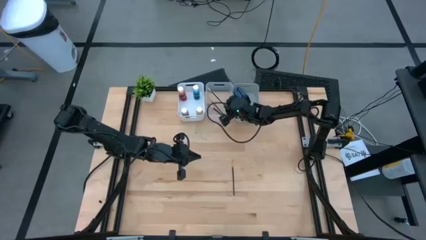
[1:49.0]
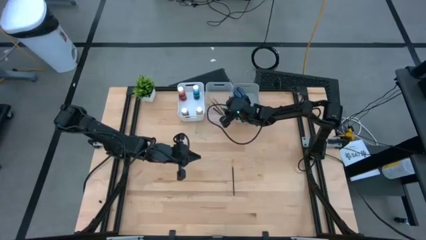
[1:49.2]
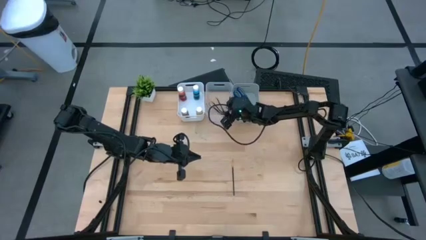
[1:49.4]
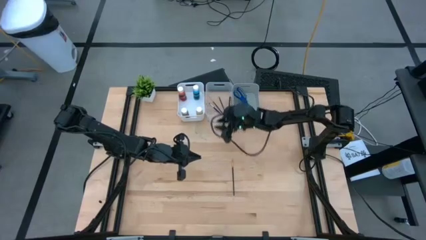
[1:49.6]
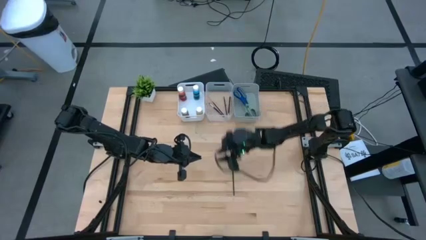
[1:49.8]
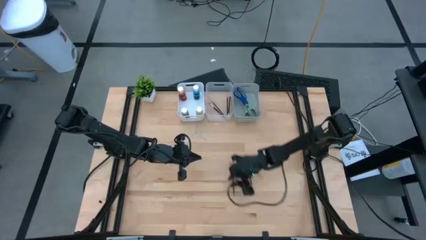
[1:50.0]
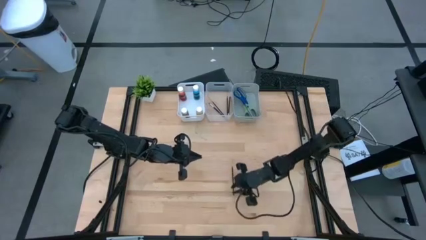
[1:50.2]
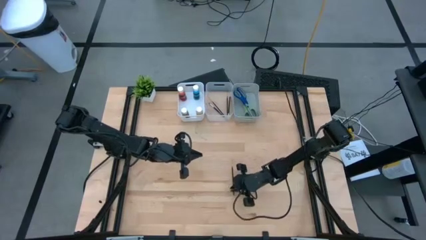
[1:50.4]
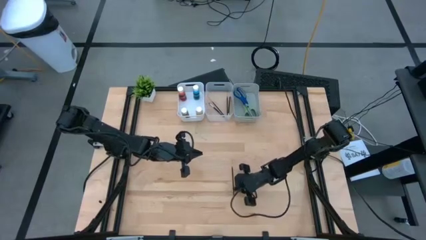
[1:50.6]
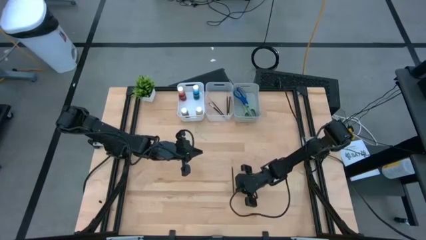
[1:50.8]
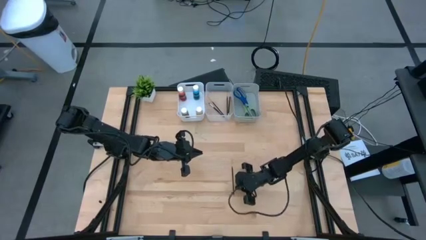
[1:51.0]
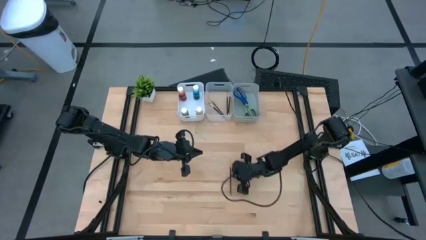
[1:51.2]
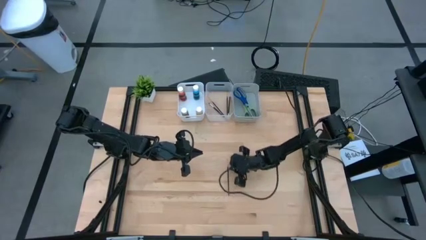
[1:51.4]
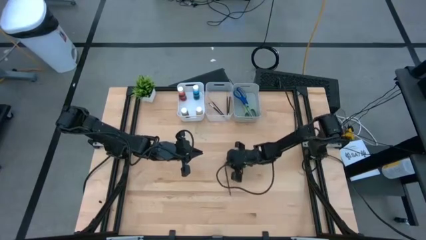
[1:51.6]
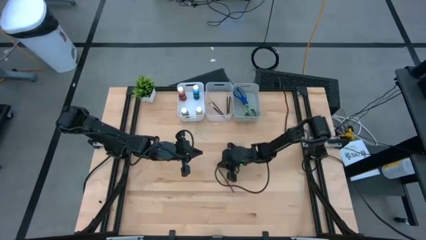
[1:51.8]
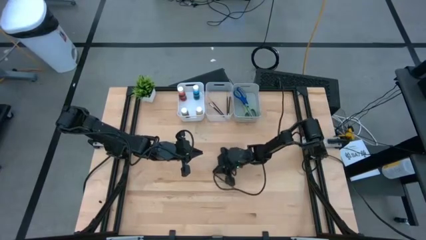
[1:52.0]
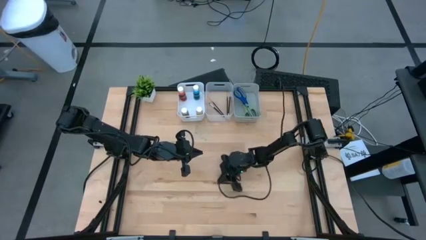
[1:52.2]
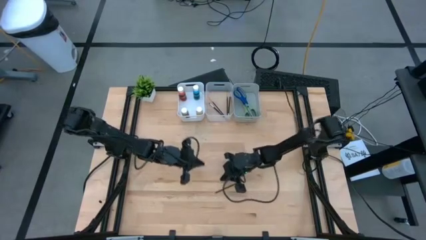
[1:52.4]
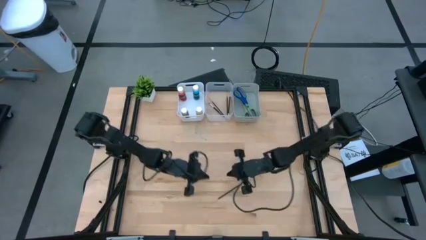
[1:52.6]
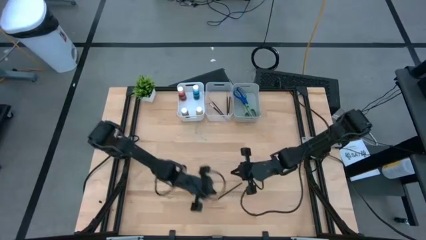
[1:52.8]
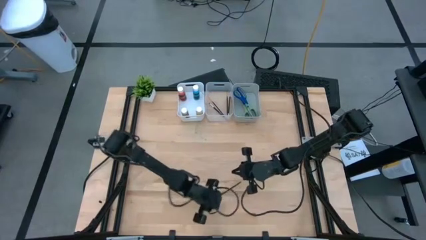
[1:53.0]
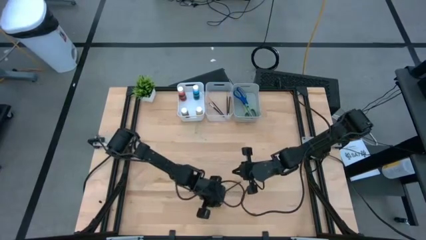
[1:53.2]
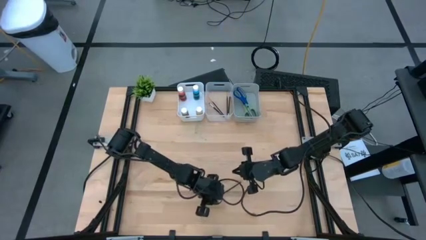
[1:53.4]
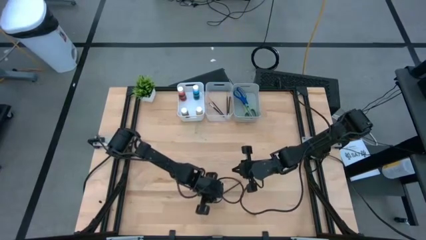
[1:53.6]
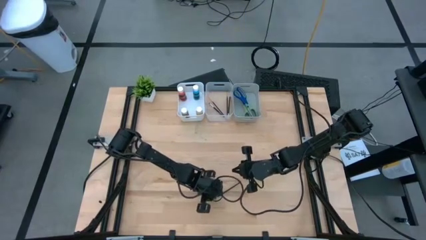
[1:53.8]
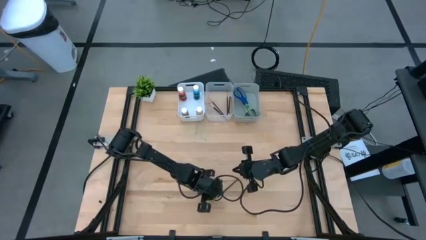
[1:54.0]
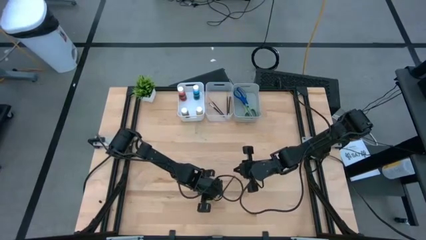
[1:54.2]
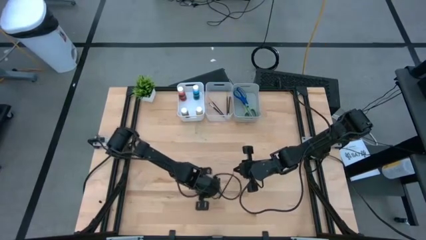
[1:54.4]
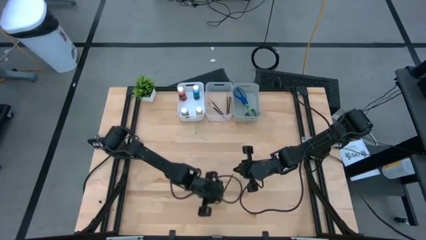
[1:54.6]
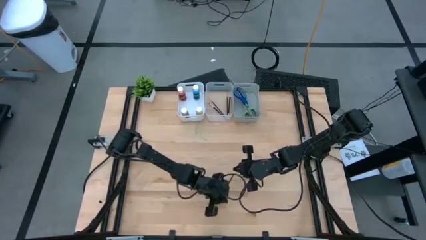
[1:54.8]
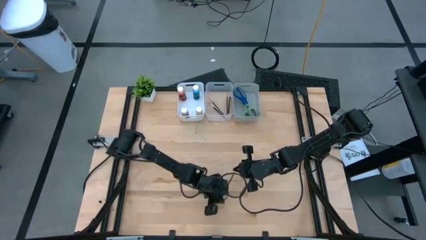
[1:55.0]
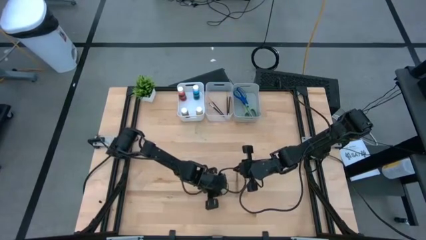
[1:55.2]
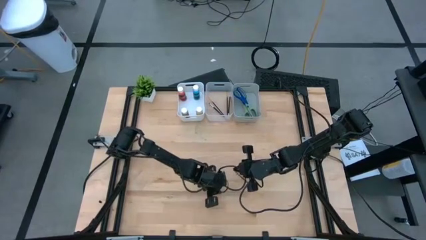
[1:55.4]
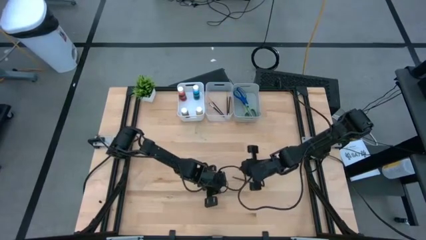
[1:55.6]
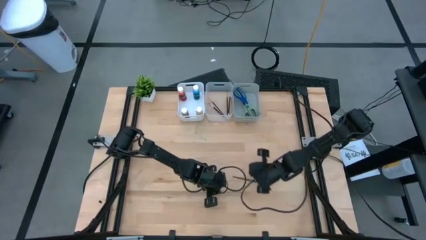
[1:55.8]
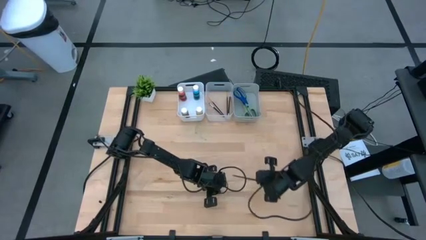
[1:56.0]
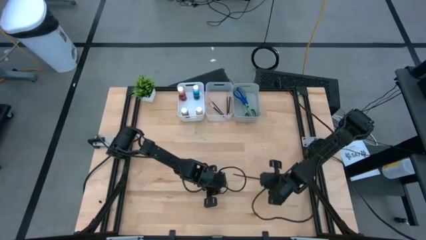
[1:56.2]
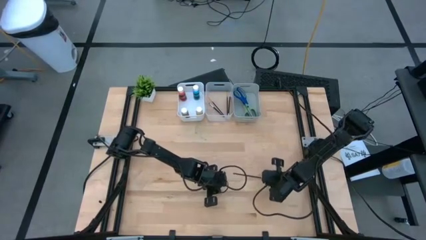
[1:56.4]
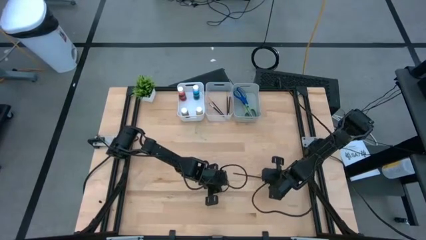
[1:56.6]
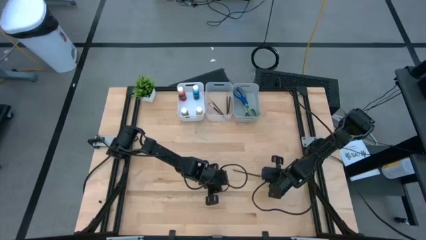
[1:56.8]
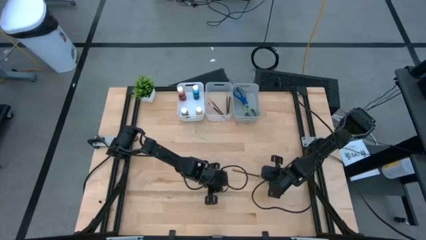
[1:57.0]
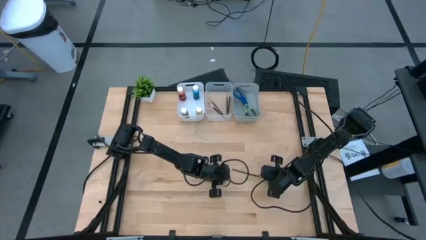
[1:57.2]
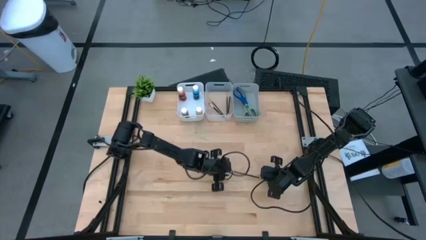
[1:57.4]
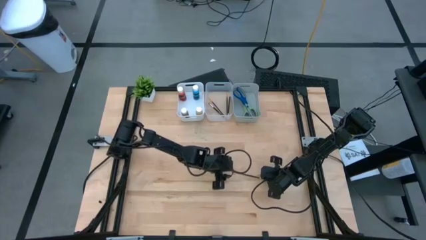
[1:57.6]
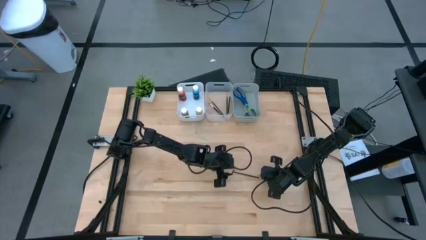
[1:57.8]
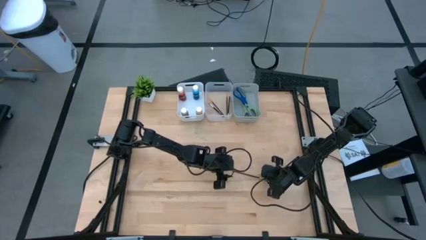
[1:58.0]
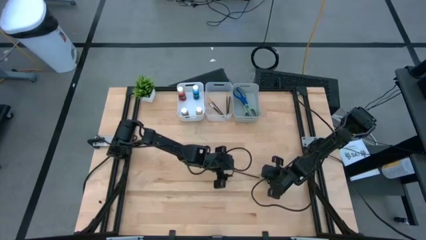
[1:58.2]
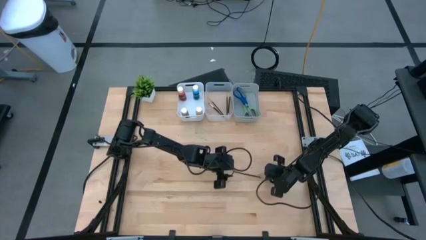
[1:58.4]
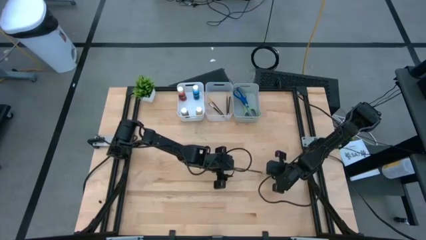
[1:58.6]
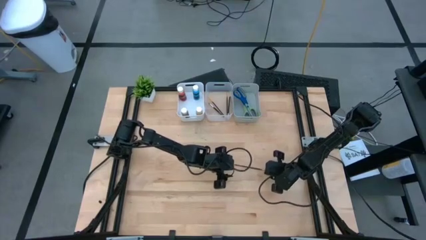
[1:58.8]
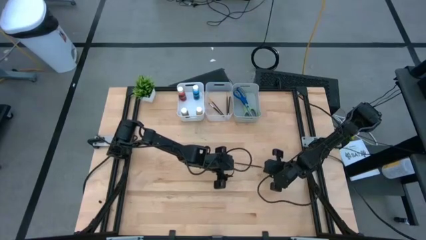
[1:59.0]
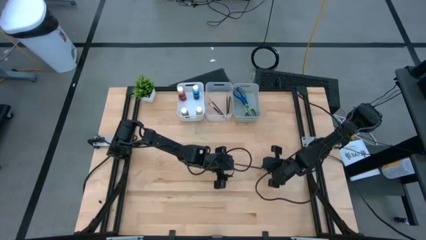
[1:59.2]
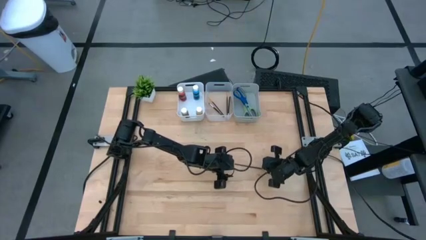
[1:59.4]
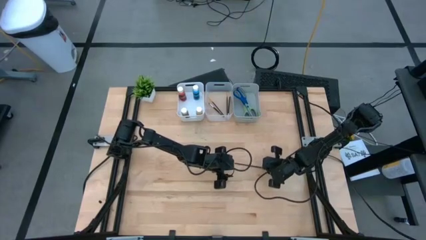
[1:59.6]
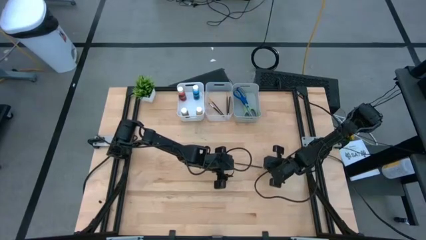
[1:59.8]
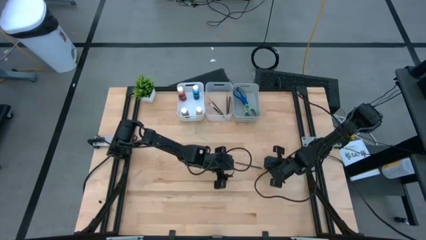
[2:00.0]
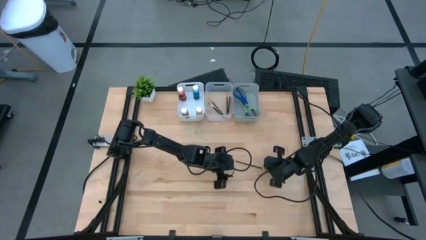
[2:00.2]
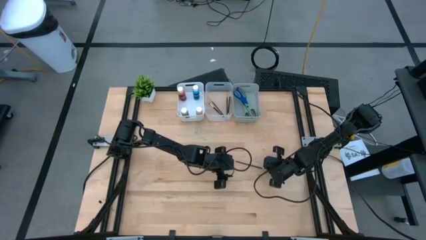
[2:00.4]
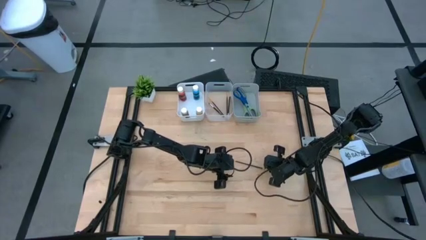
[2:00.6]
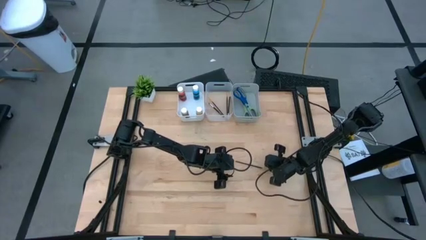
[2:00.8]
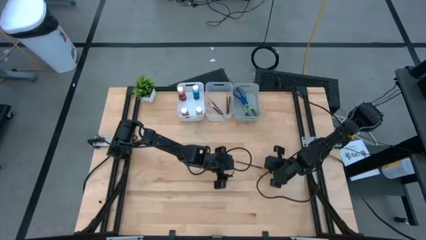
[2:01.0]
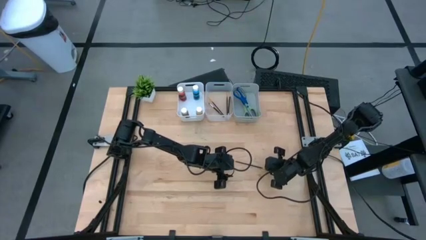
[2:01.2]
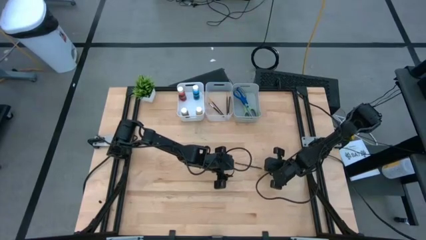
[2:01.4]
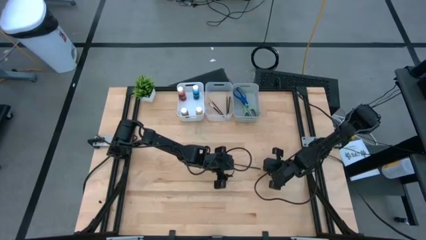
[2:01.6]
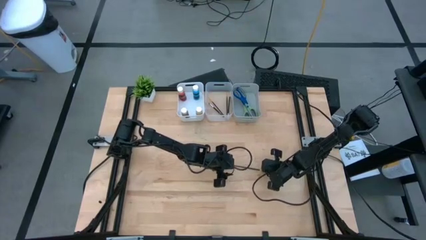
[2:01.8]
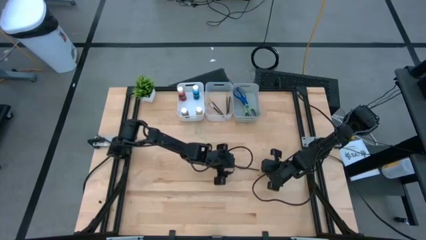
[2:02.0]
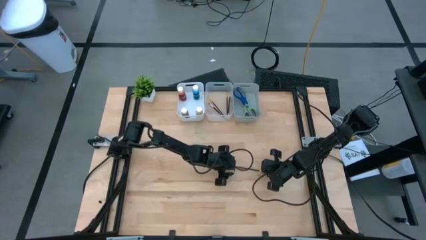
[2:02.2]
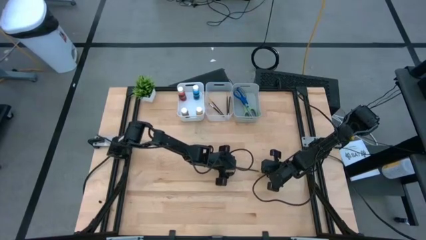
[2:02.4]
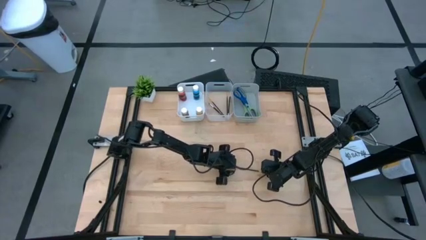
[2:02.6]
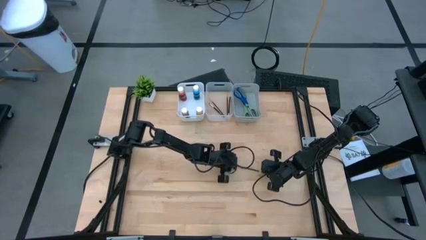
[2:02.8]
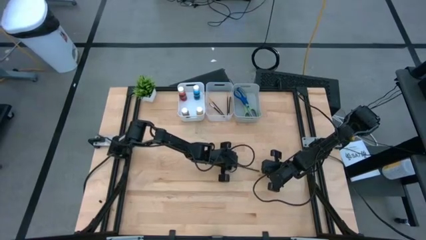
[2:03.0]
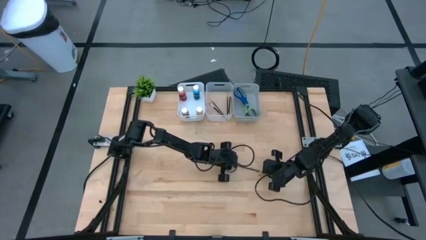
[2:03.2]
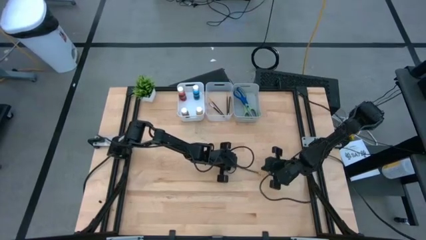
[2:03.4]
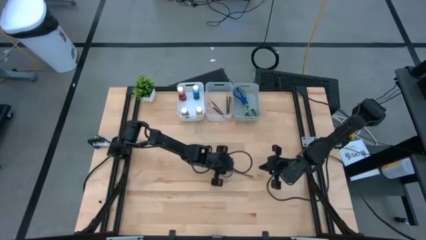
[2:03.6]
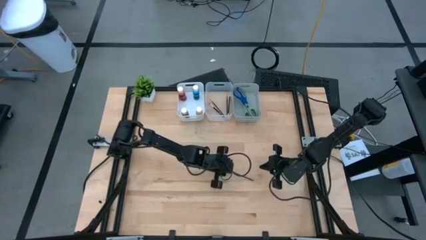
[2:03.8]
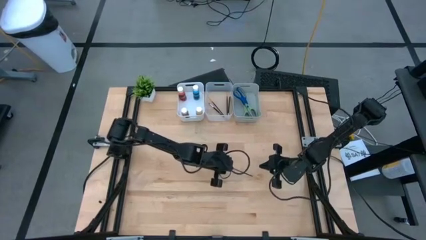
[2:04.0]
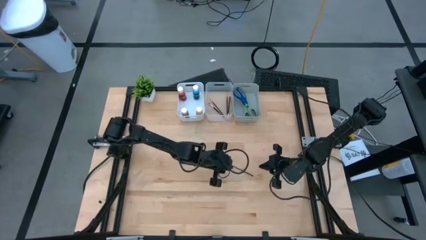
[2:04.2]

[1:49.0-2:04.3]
Task: Pick & Place Paint Supplies
Put the golden paint brush into the transparent bin

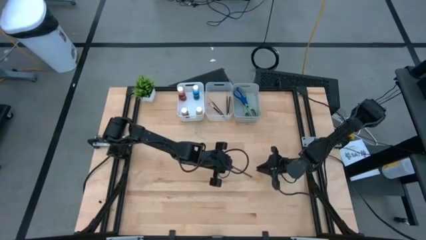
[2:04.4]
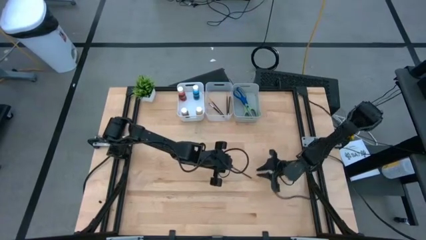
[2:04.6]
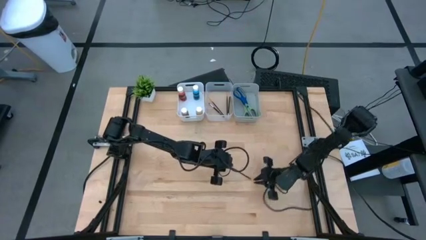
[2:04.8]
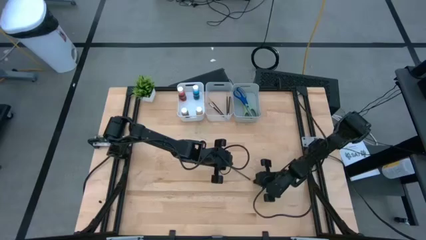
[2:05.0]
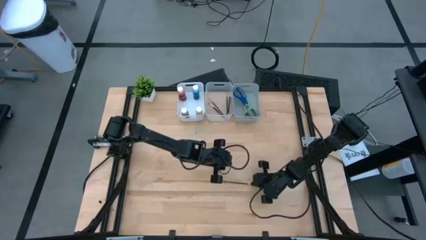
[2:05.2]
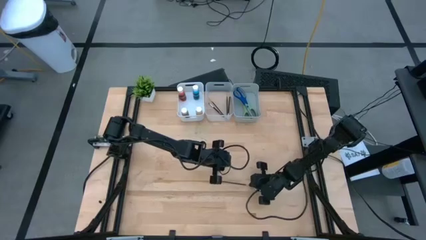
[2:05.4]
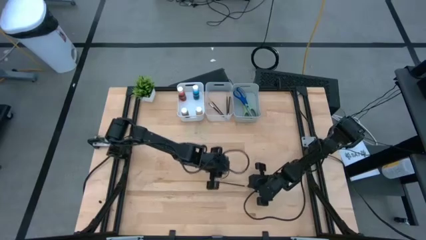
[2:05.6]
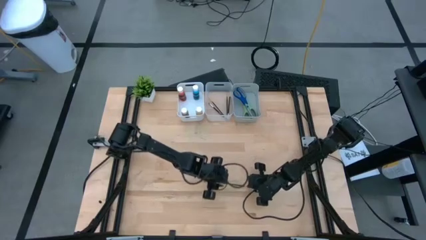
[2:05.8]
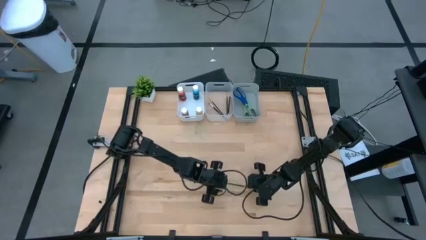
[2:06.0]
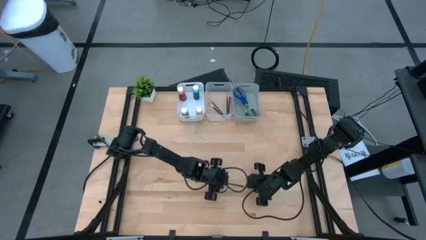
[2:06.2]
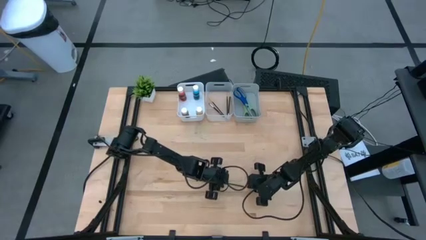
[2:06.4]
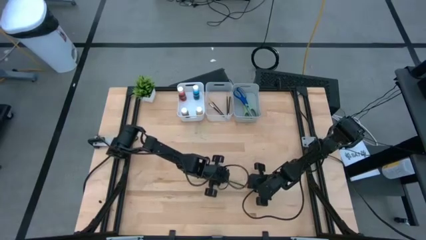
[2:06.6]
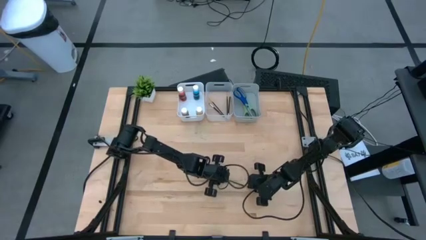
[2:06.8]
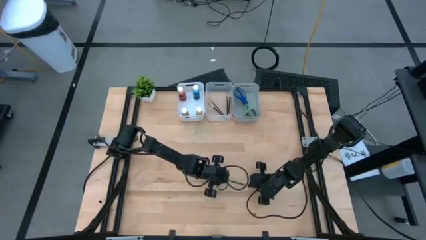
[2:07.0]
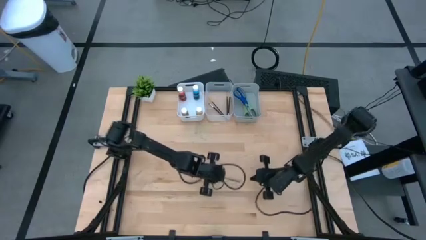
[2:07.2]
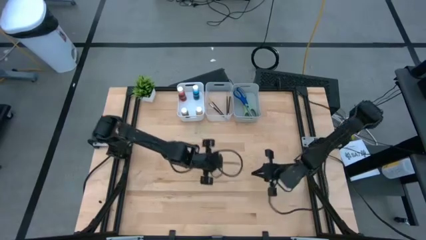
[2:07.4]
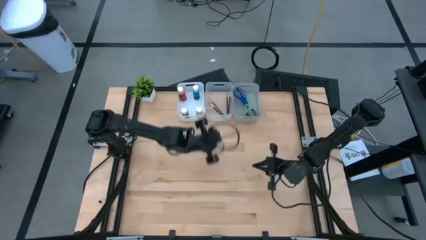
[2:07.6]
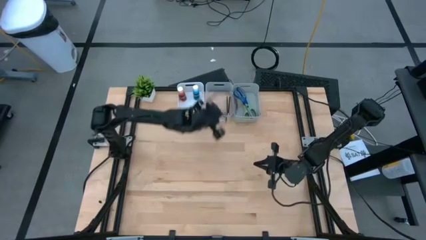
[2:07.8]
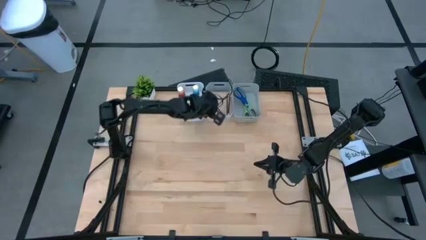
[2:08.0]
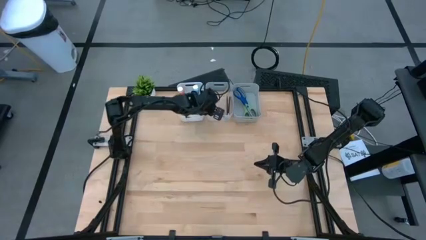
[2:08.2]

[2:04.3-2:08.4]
Put the golden paint brush into the transparent bin
